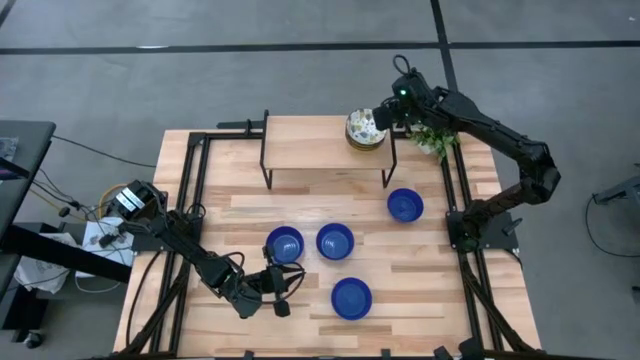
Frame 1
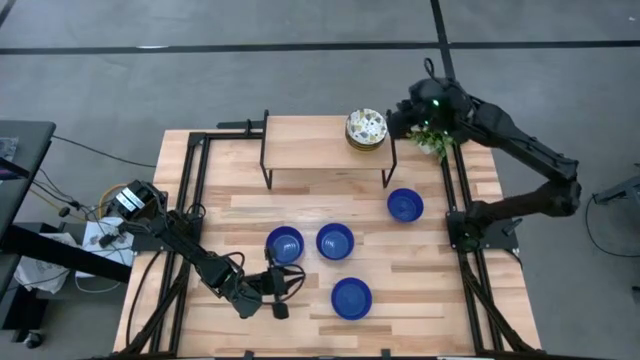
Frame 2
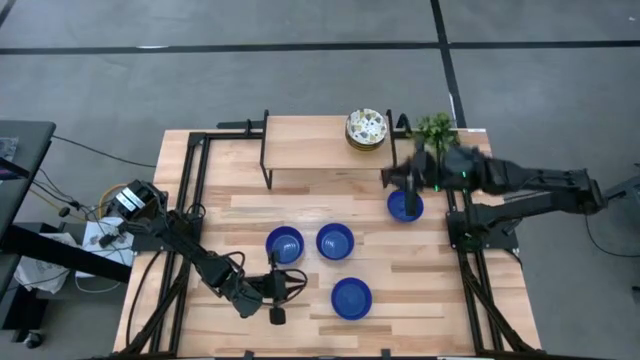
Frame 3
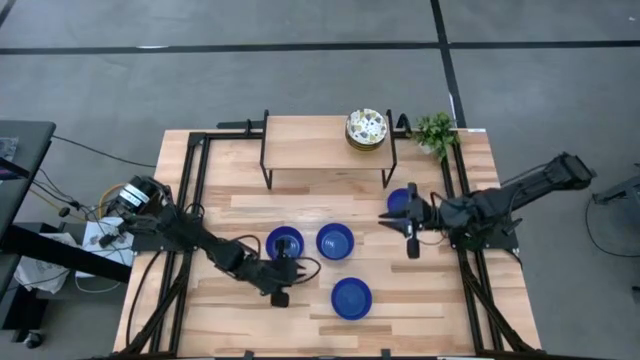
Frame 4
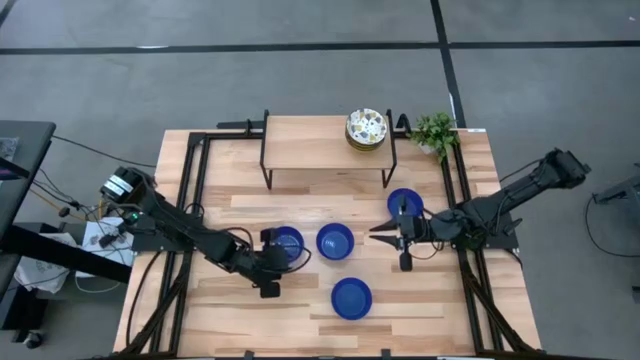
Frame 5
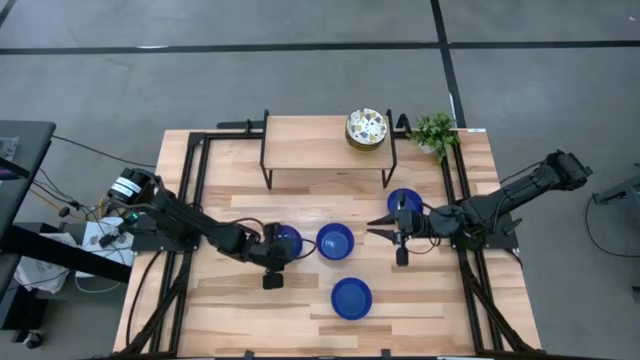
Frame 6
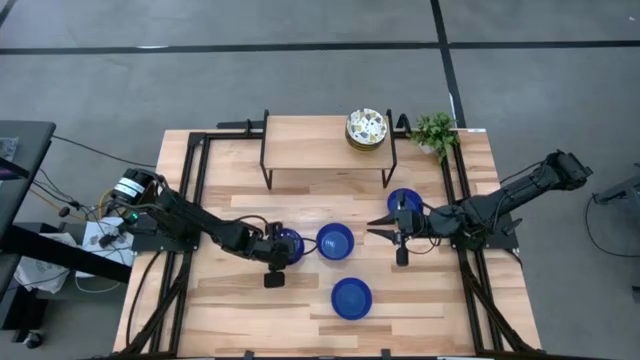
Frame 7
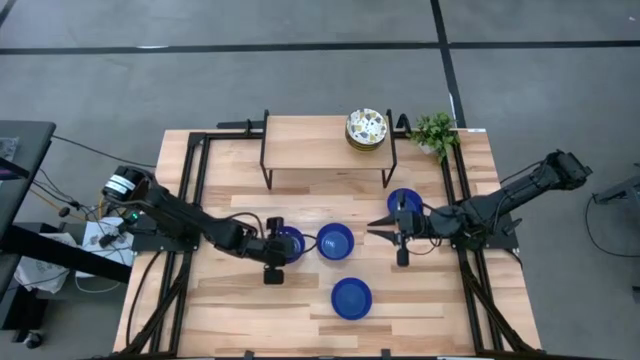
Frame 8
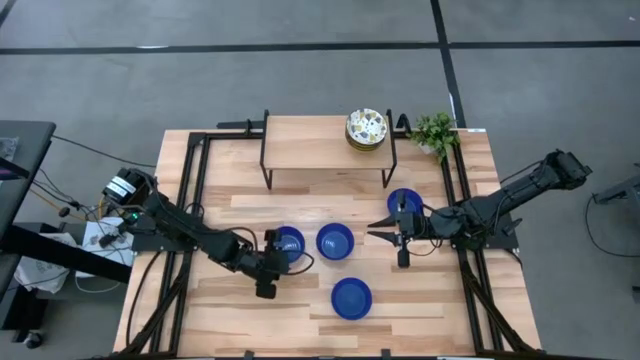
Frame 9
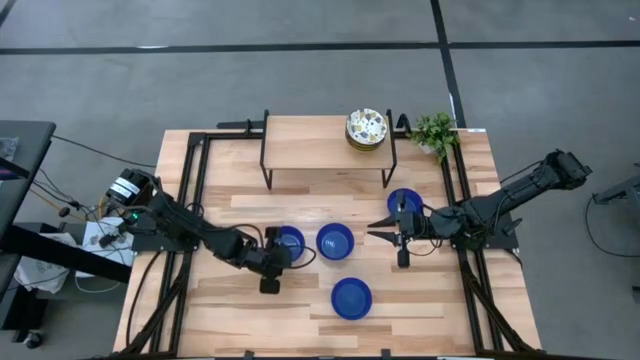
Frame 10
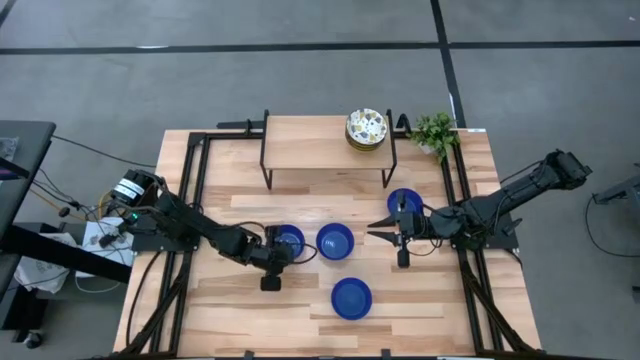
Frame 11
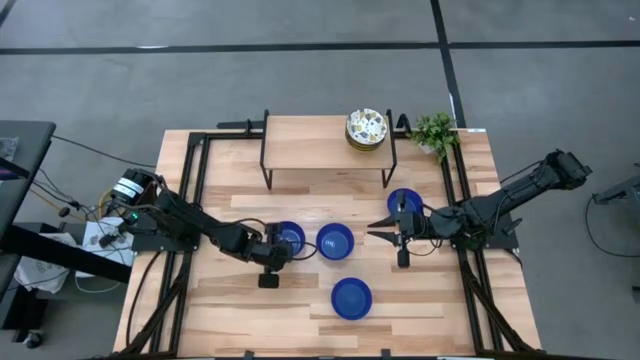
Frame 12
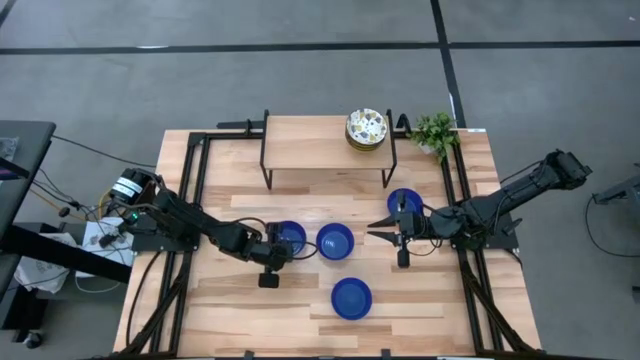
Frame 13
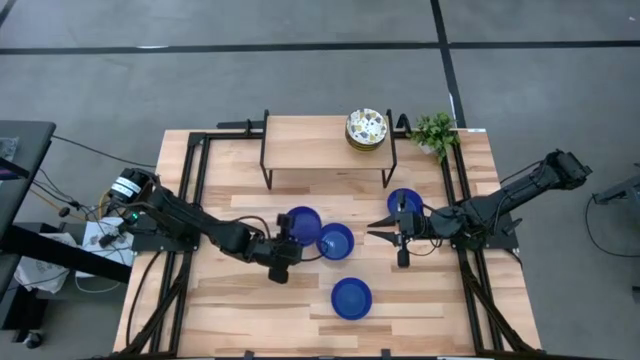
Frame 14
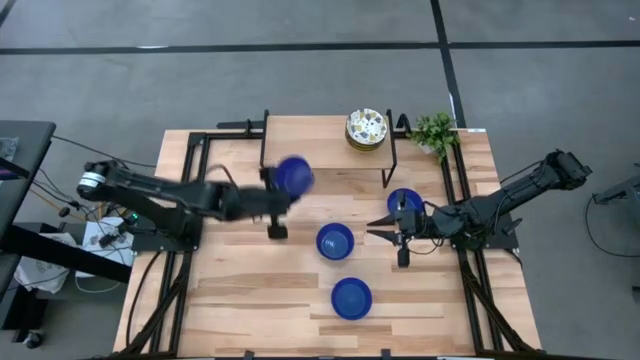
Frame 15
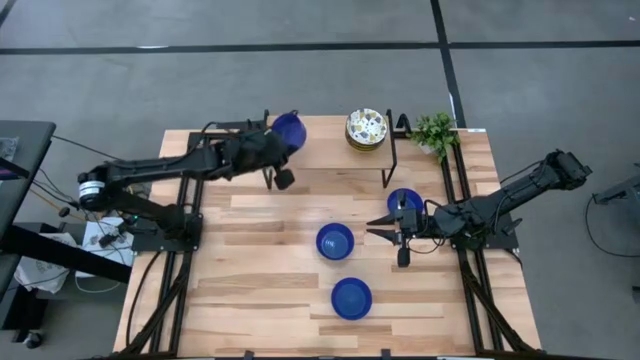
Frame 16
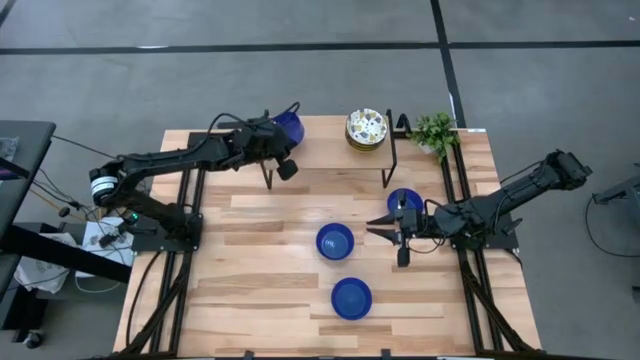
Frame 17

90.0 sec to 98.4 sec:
Task: Pick & Place Mini bowls
Put the blue bowl on the shelf

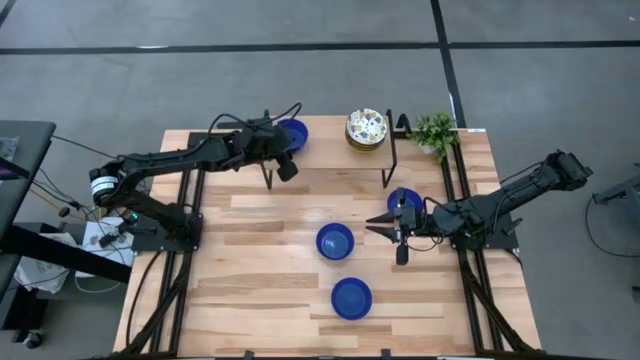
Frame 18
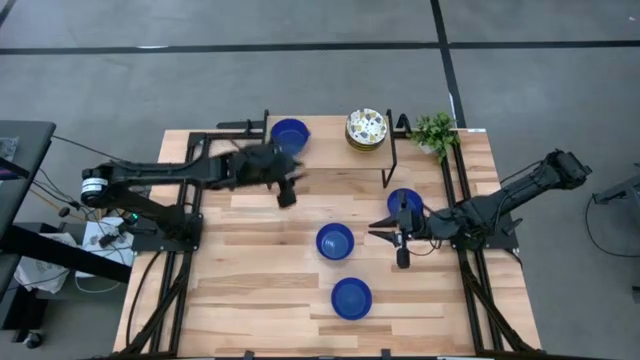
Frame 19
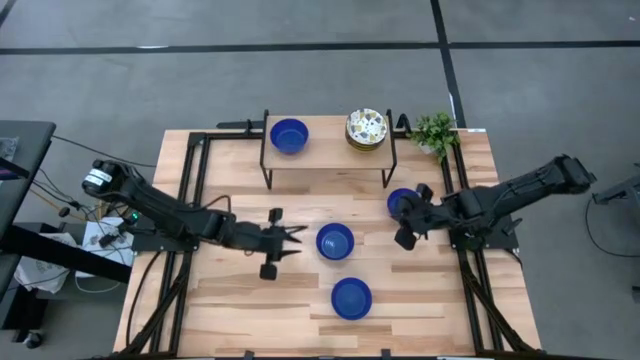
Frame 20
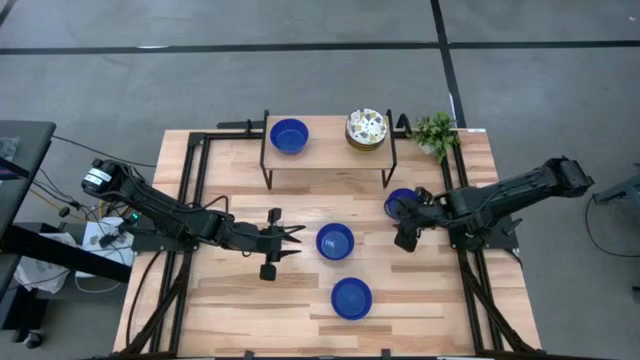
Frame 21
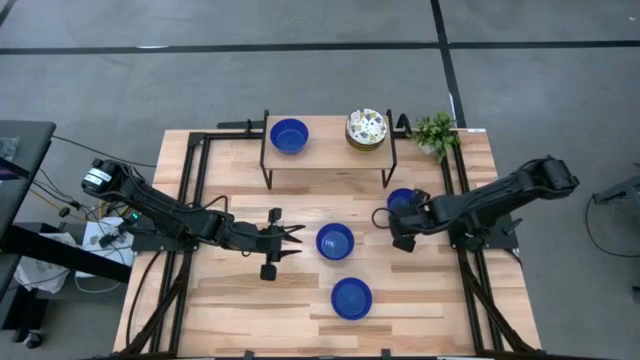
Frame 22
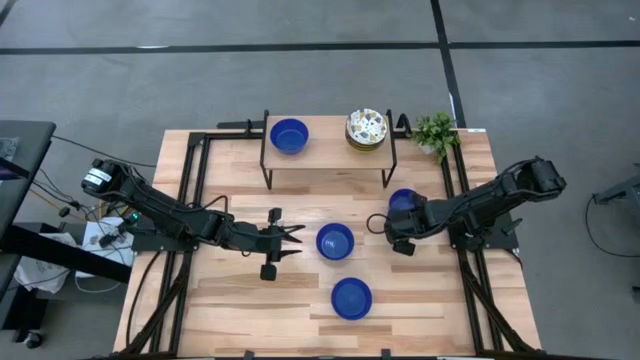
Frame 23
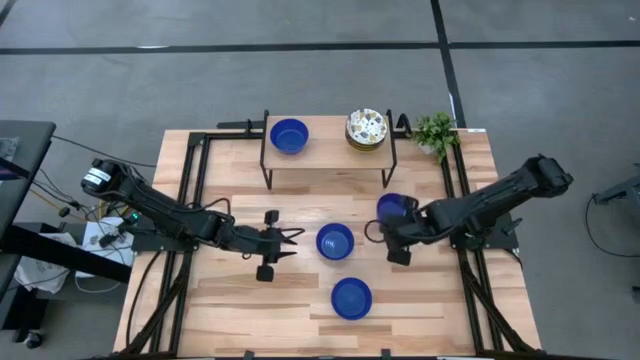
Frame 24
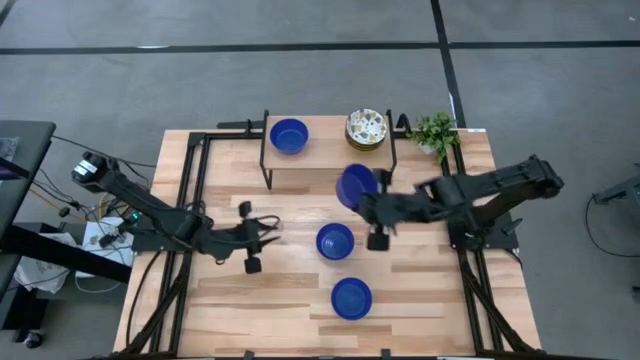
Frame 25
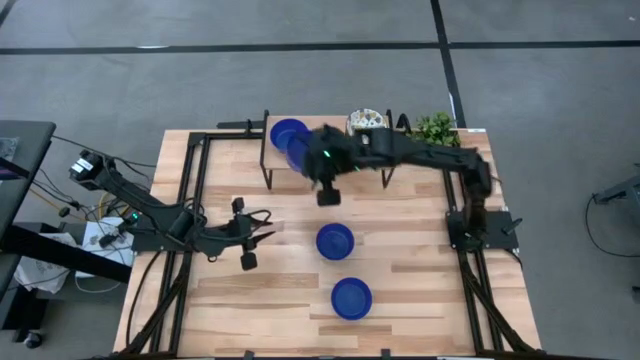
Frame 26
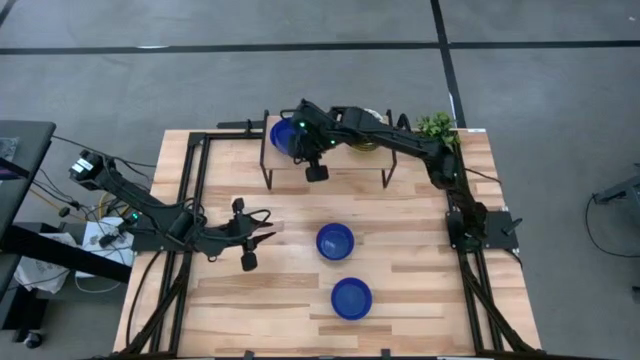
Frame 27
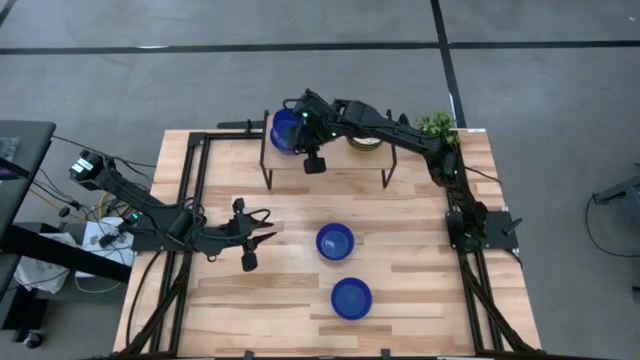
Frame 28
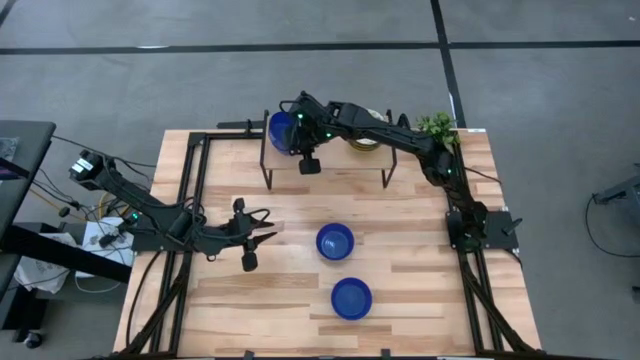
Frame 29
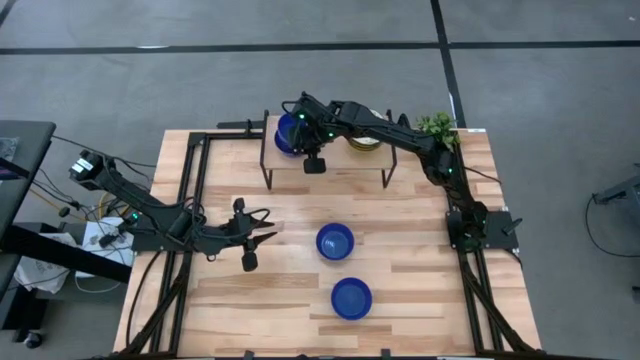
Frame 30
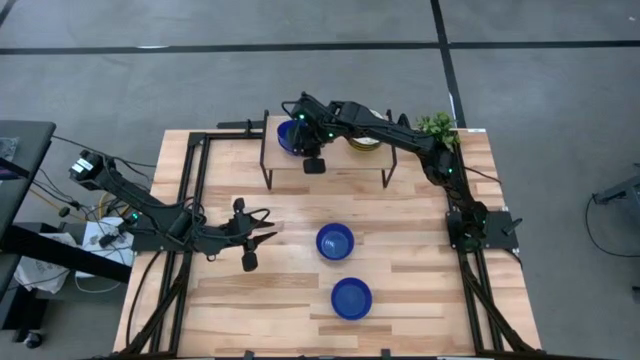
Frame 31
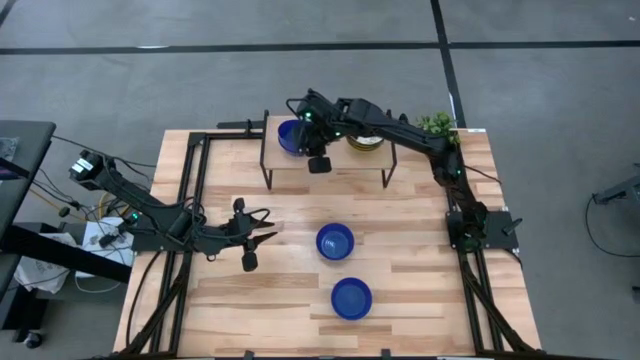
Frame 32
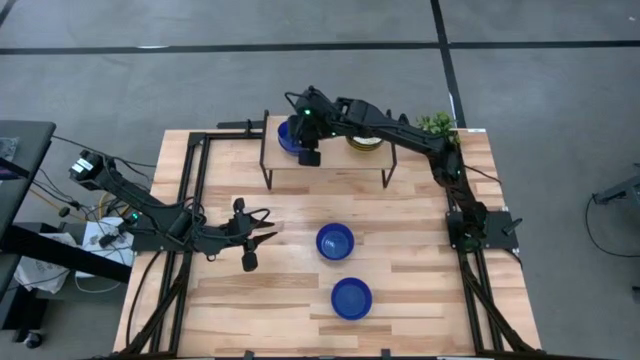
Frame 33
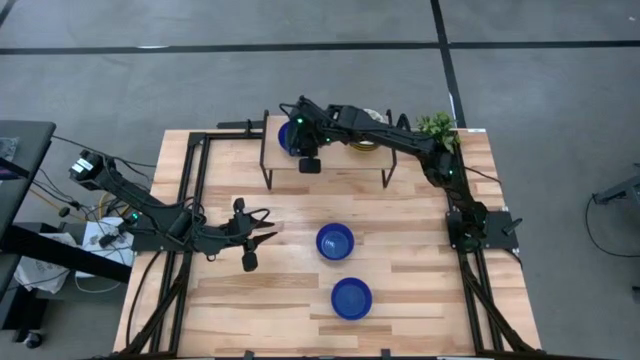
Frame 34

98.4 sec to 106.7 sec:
Stack the blue bowl on top of the blue bowl on the shelf

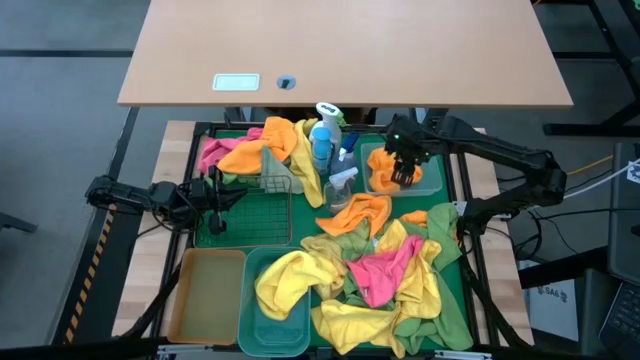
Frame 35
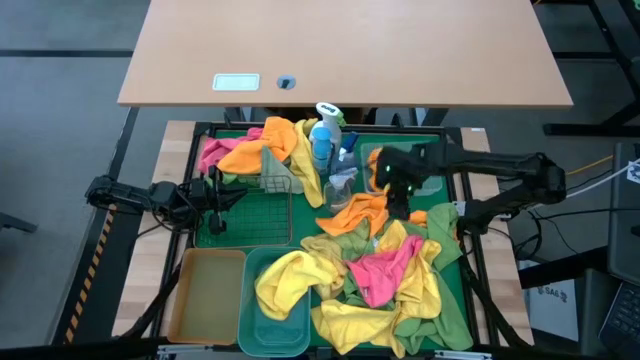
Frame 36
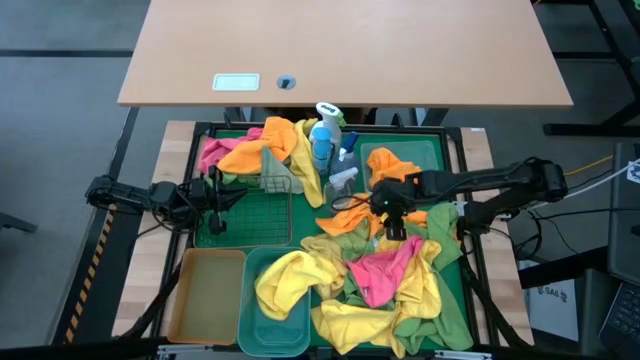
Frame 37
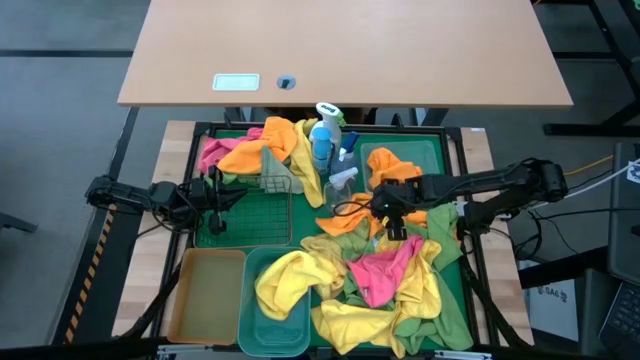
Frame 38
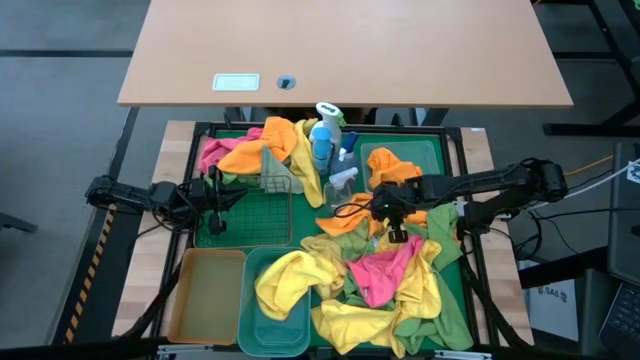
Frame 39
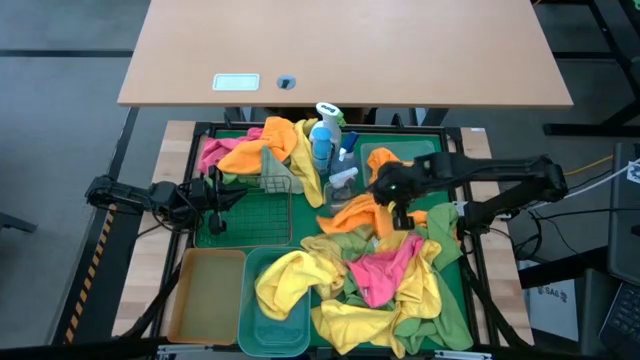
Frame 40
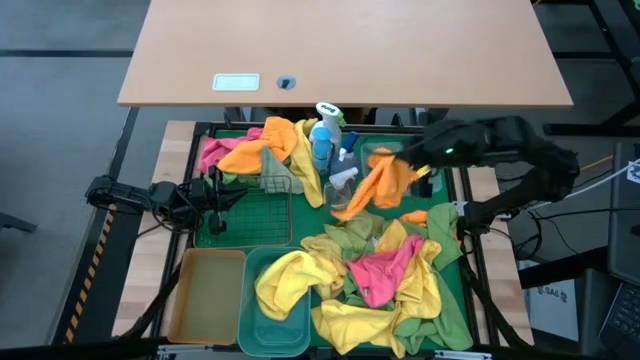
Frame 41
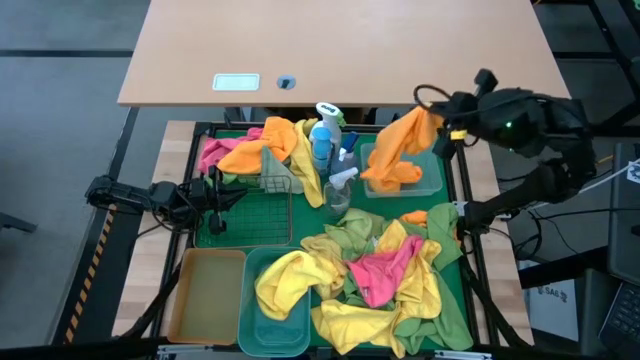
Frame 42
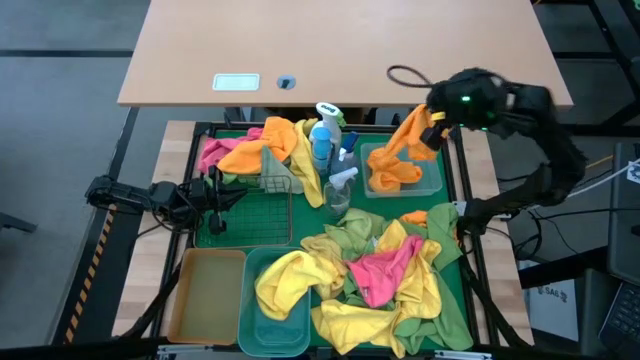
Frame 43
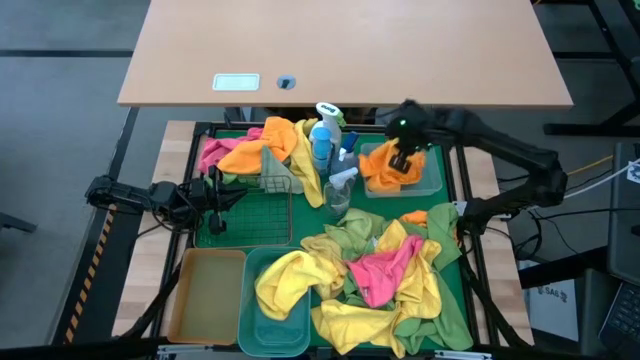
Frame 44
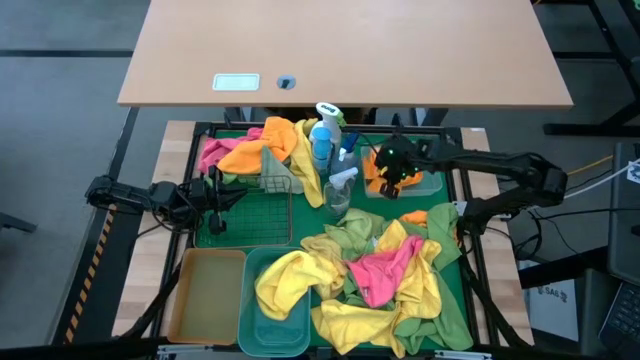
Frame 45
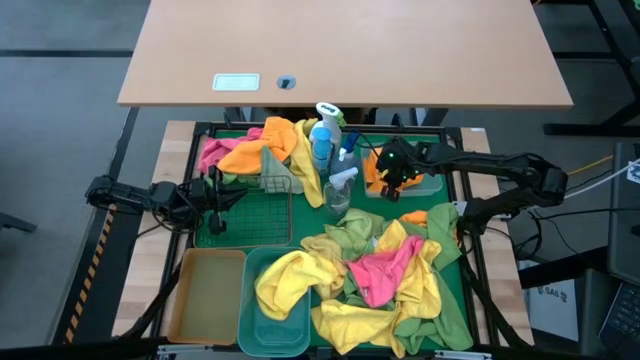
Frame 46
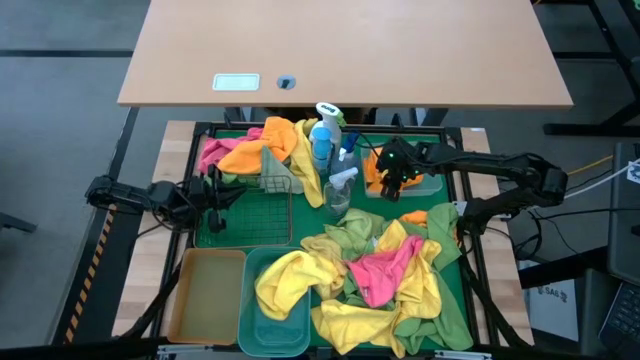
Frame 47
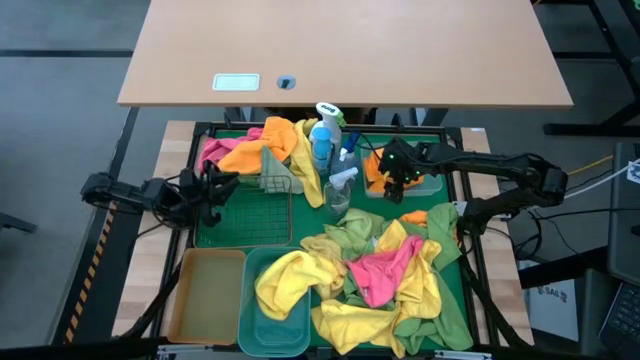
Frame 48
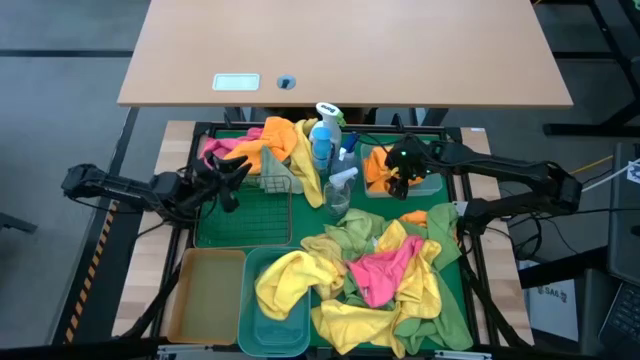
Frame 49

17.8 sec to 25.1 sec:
Task: Sort microfiber towel by color & place in baskets
Put the orange towel into the white bin
